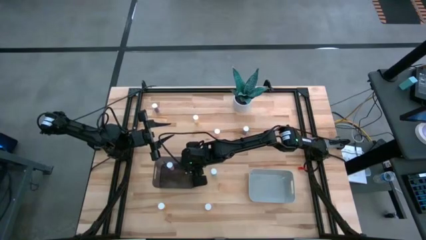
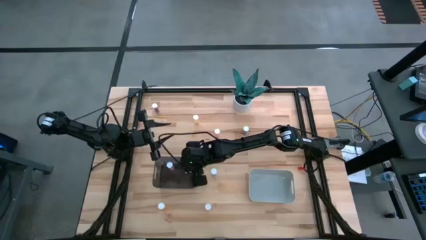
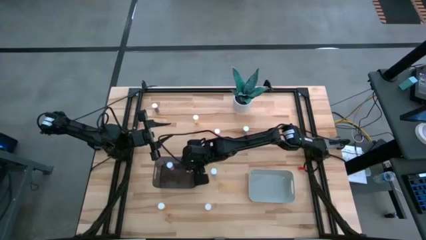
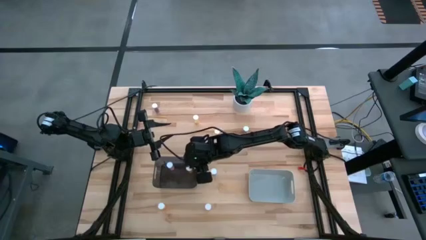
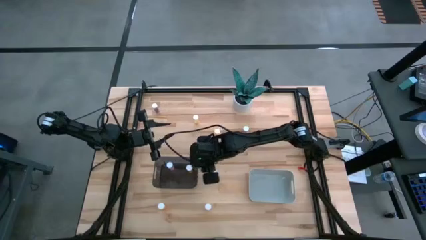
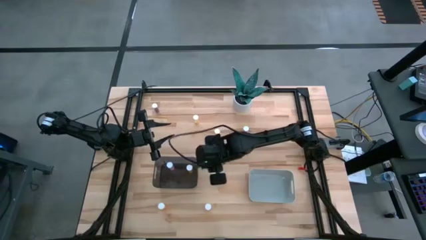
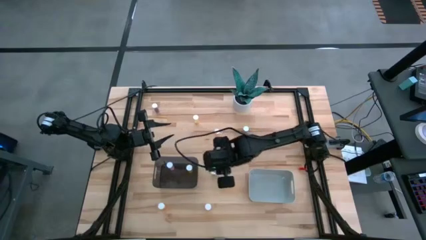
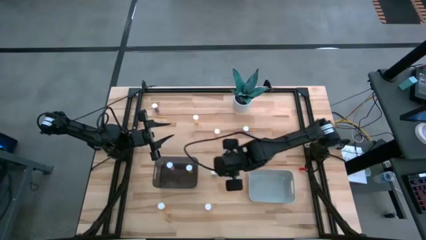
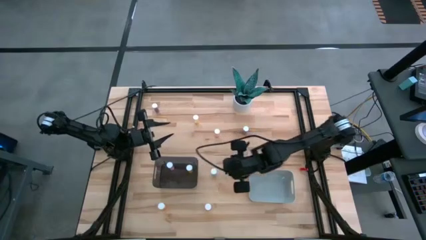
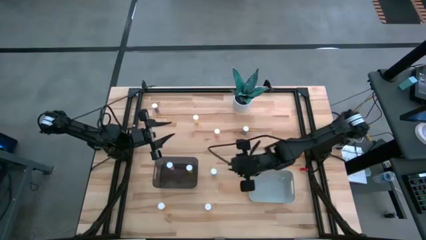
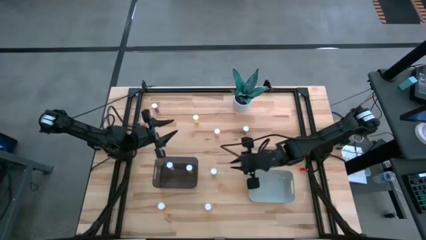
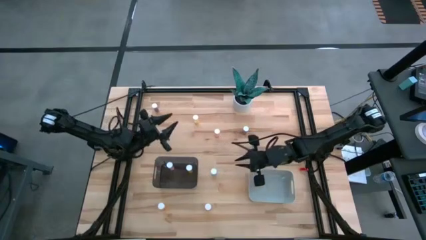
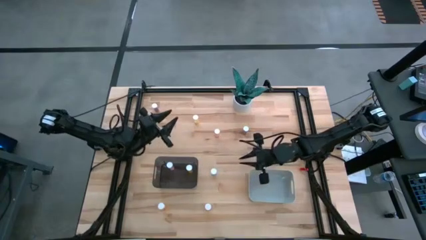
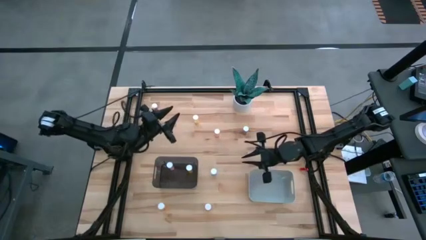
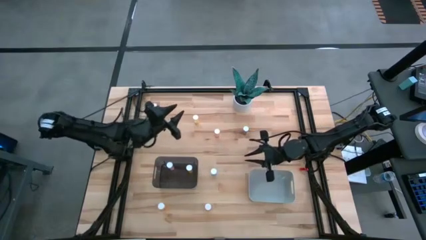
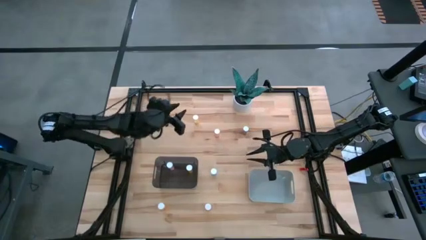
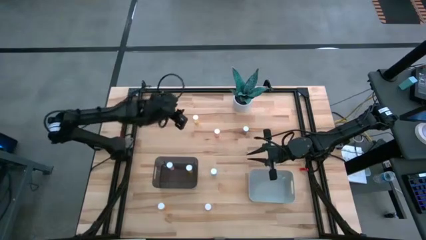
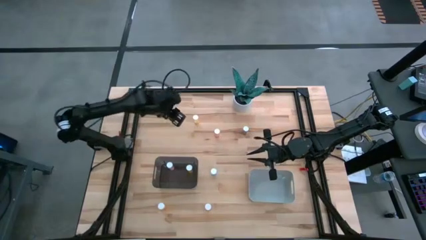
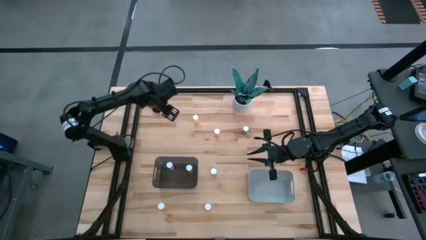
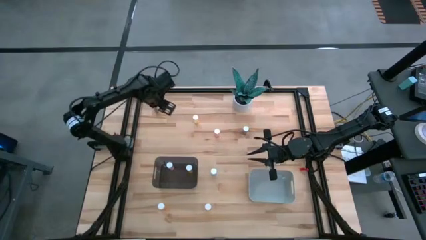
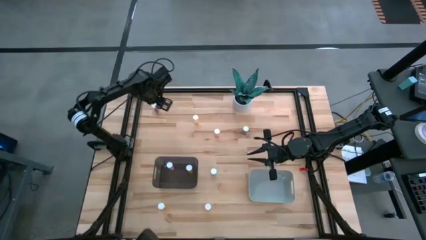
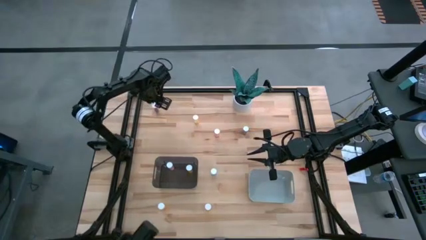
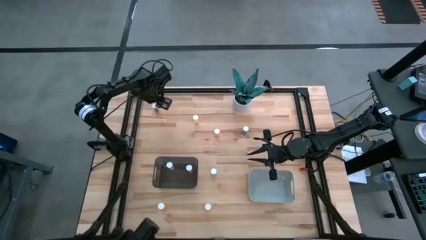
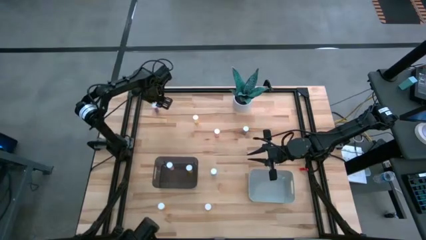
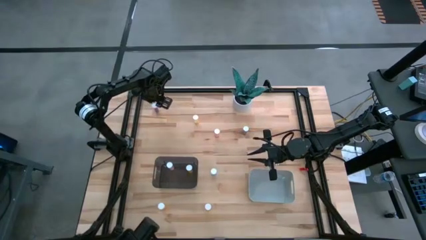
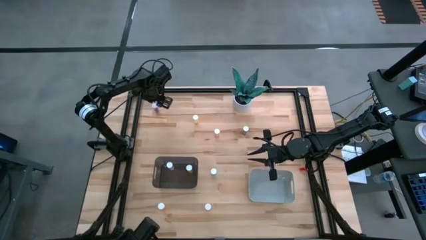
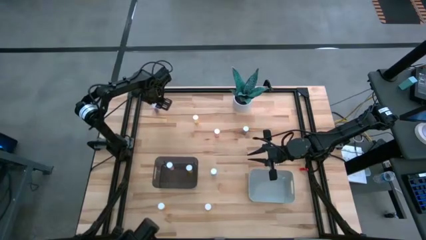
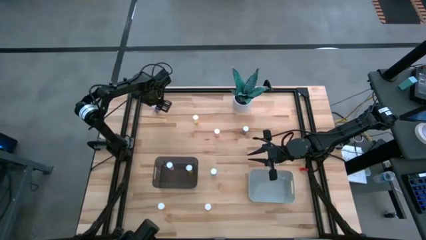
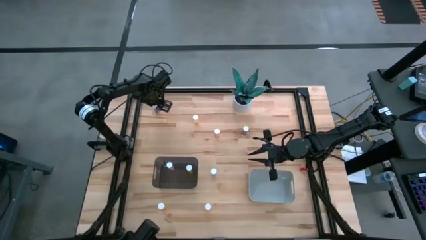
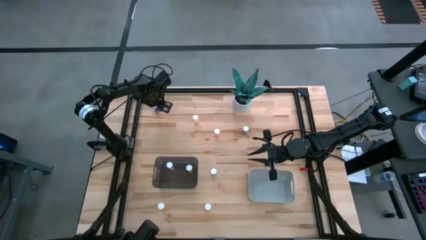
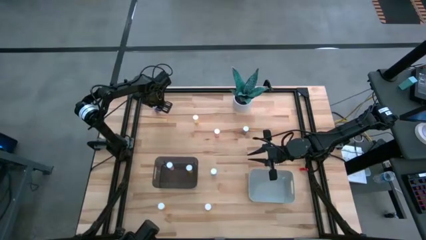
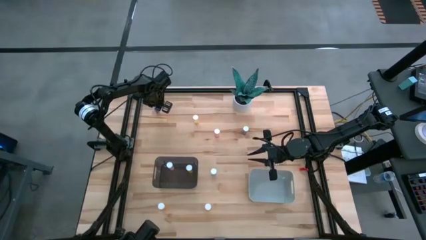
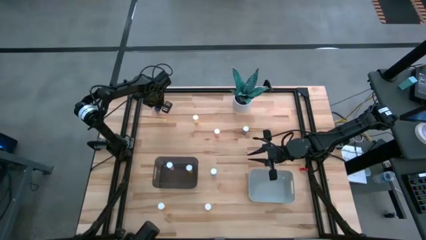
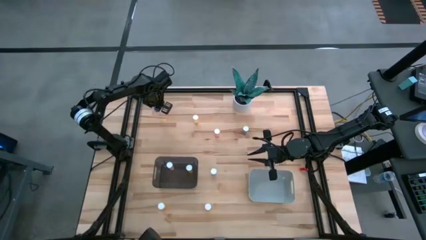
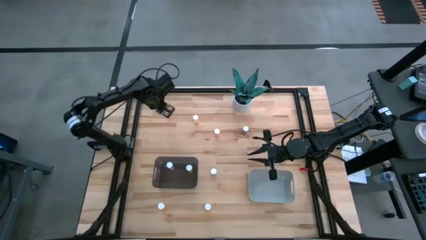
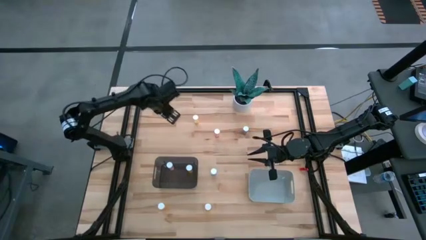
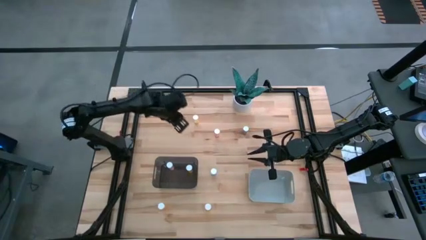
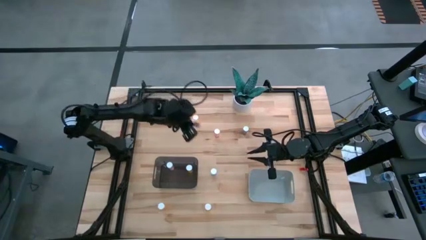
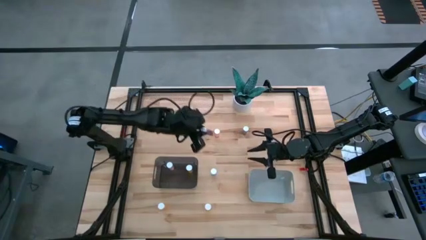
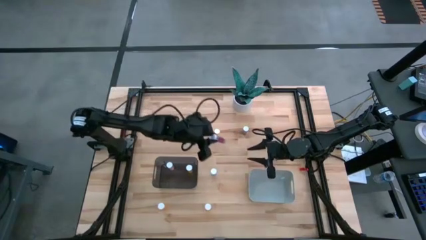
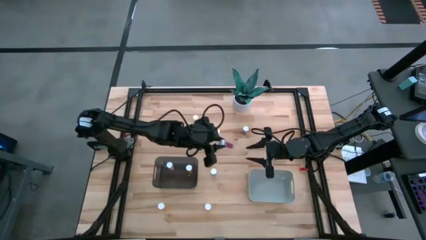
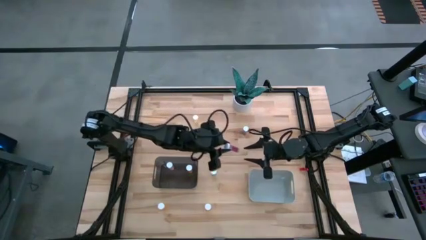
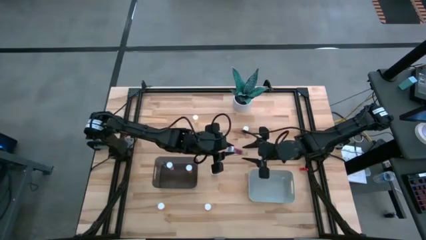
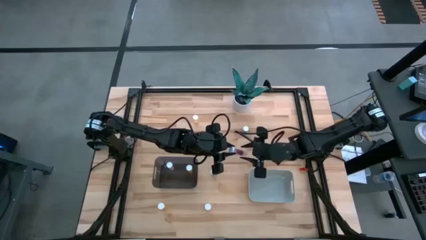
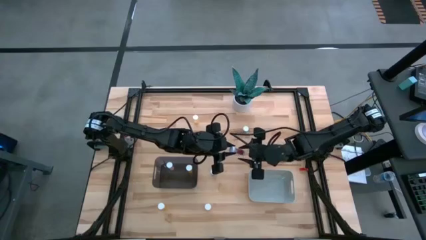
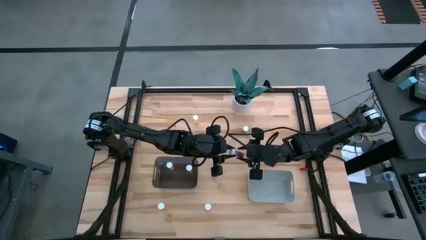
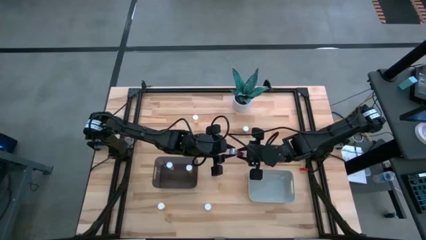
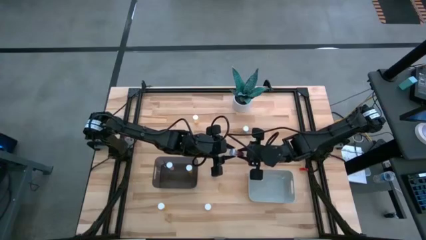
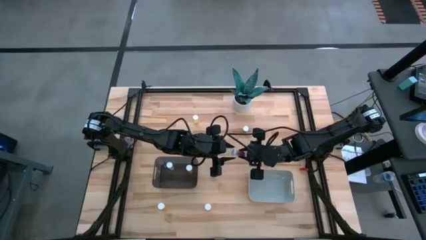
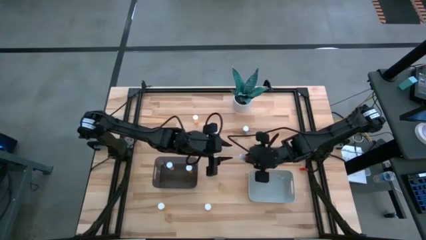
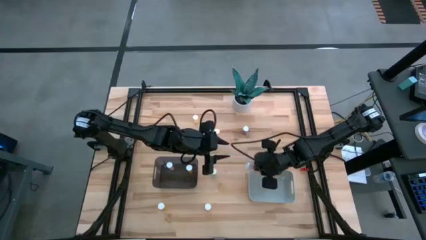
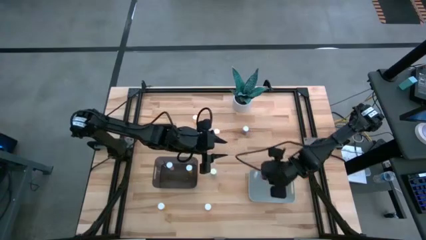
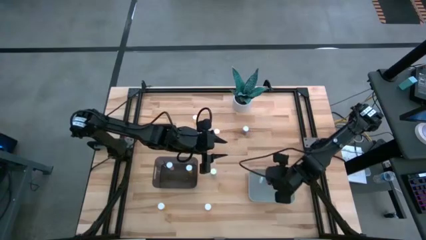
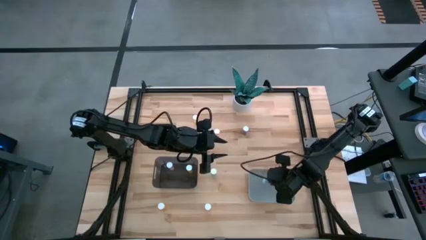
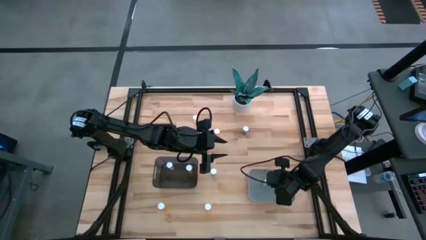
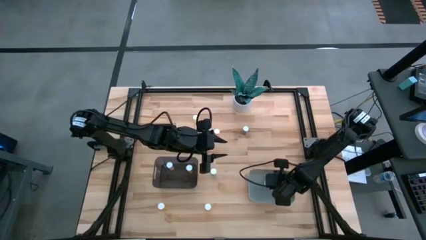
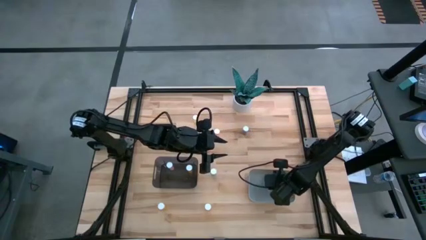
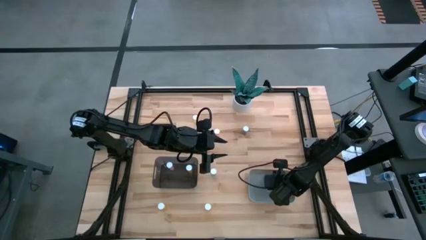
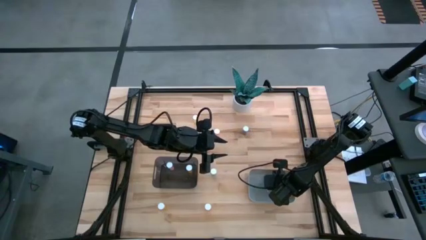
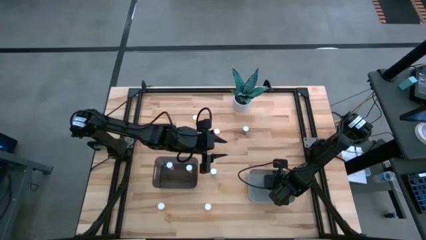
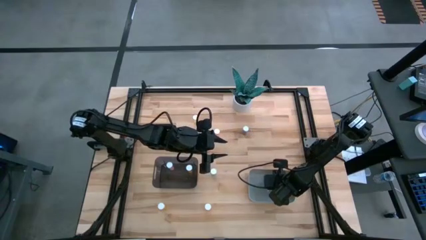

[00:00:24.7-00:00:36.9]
Task: Pick and place medicine bottles into bin by pill shape (circle, oval)
Put the top left blue capsule bottle into the gray bin

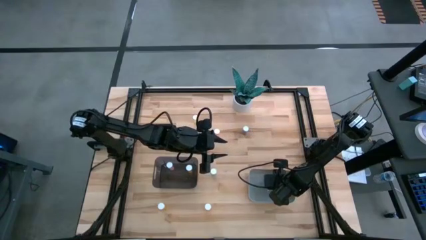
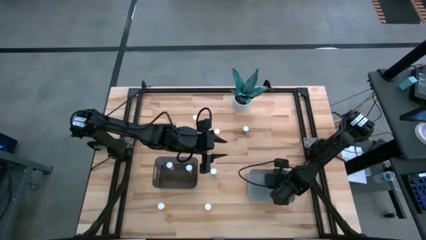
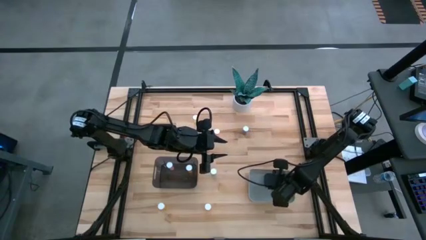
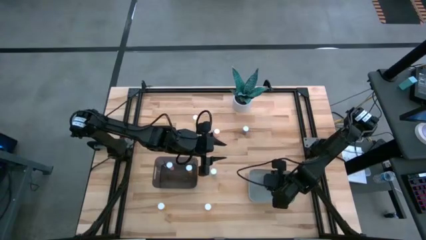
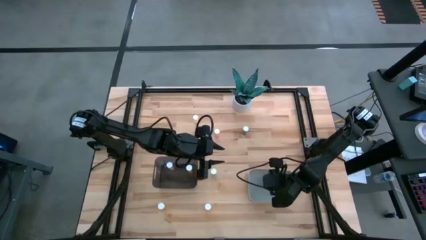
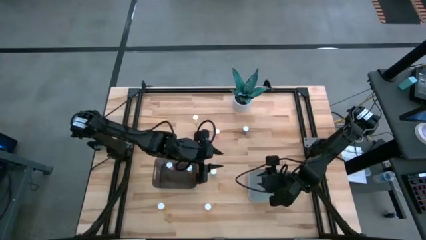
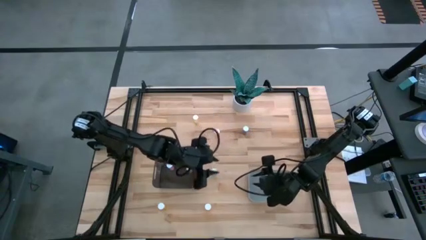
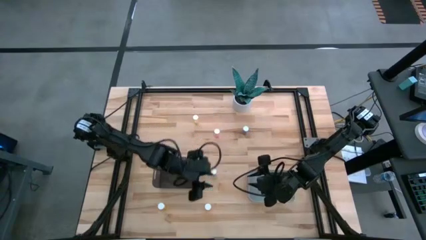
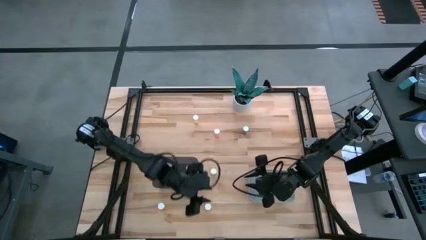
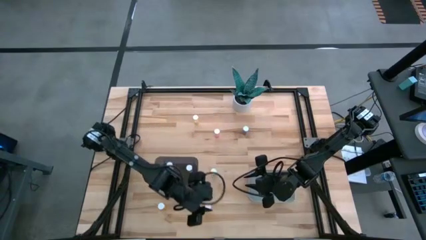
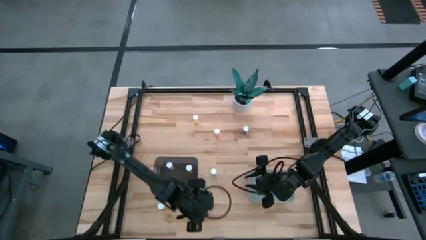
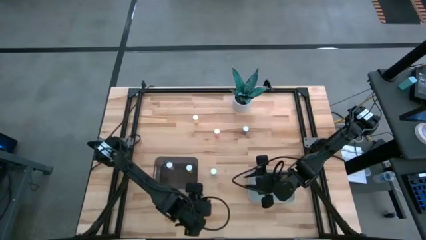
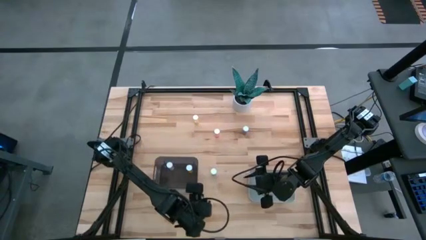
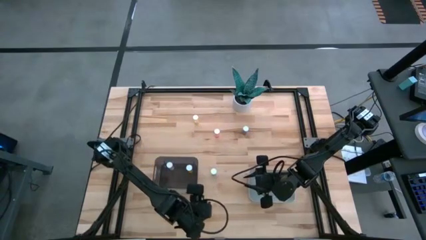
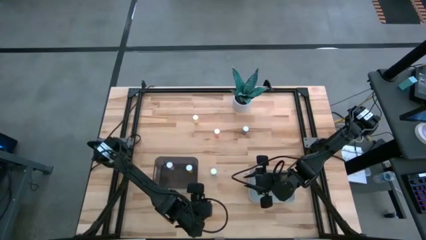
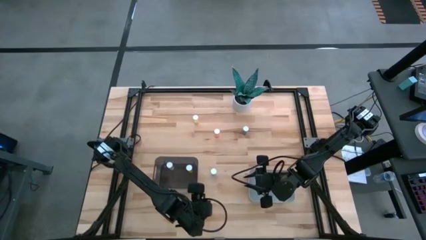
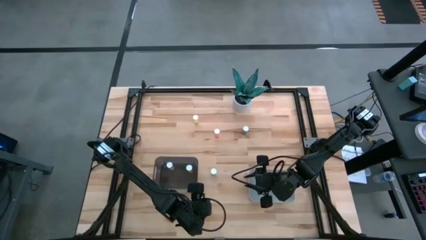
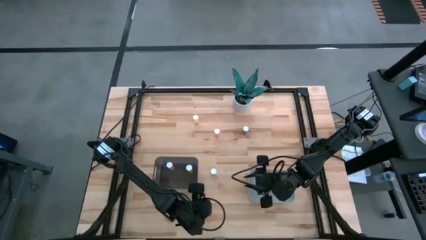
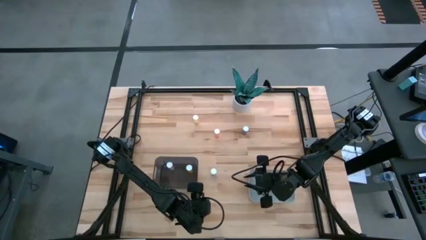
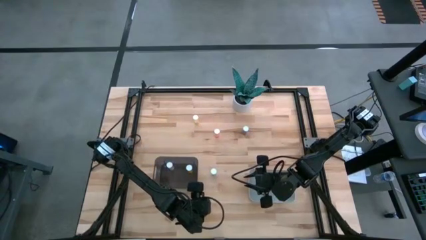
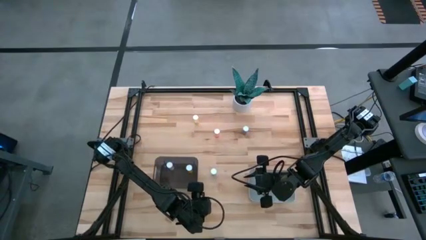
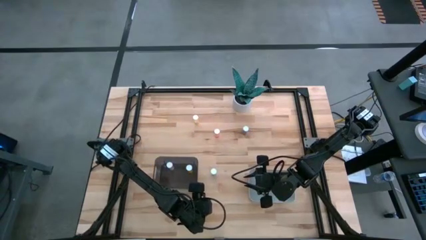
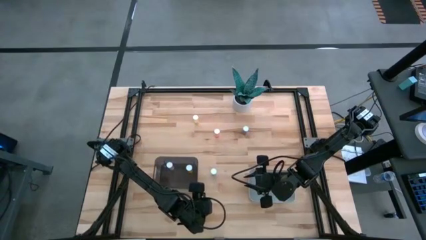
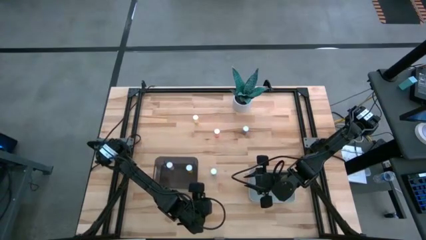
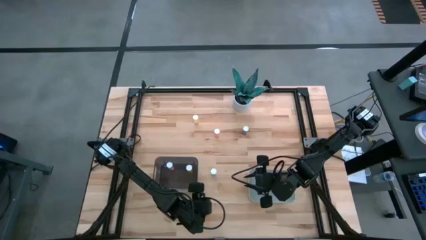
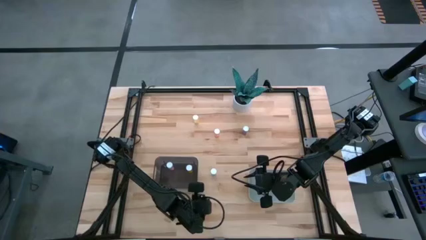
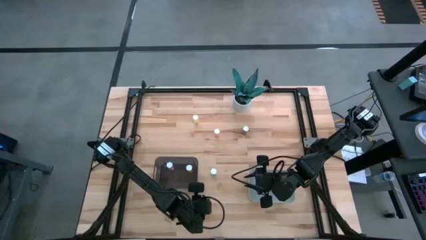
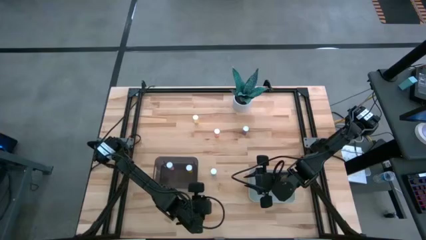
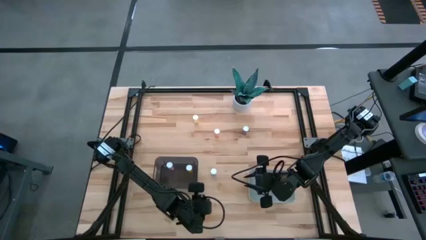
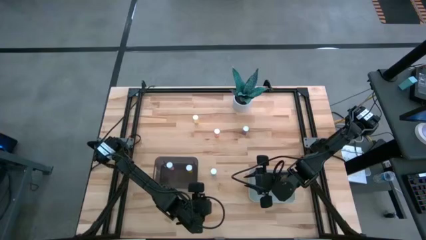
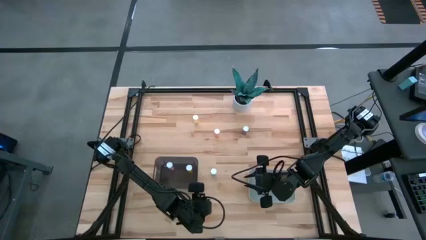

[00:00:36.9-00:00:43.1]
Put the right orange pill bottle into the black bin
